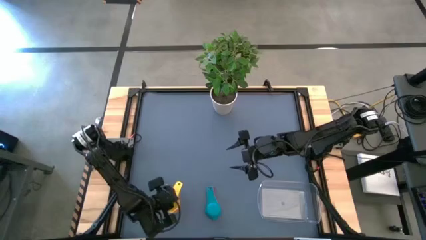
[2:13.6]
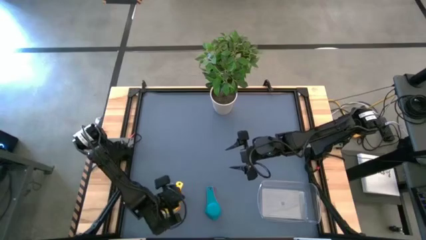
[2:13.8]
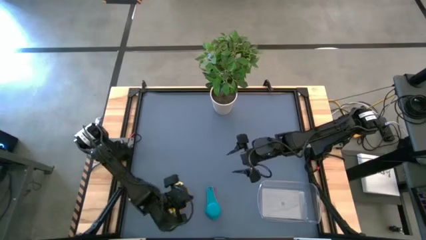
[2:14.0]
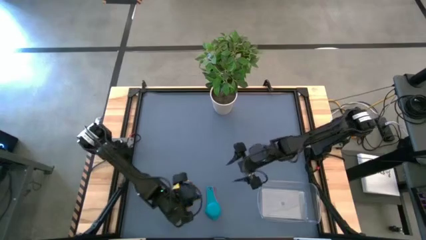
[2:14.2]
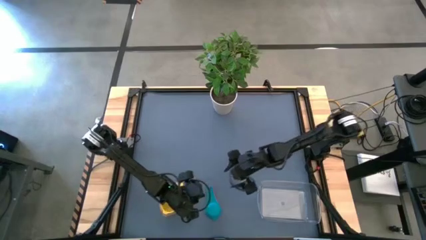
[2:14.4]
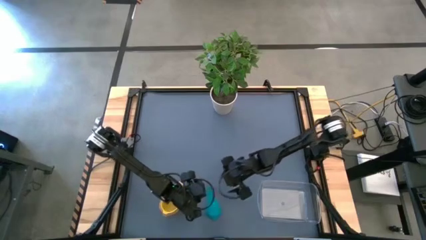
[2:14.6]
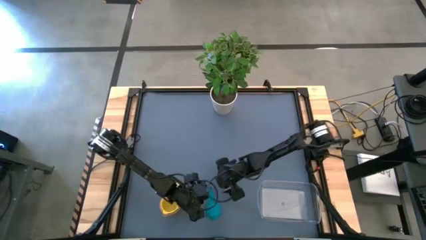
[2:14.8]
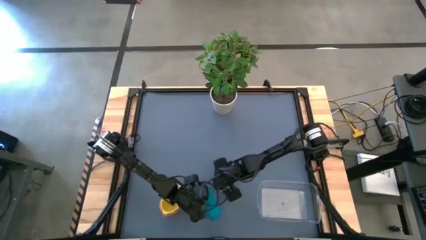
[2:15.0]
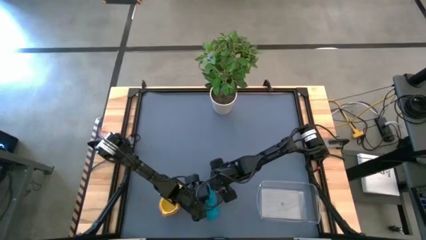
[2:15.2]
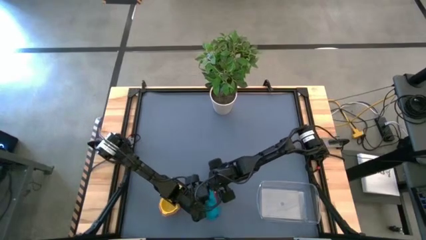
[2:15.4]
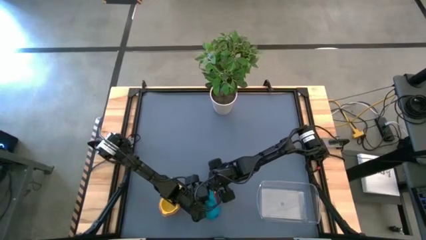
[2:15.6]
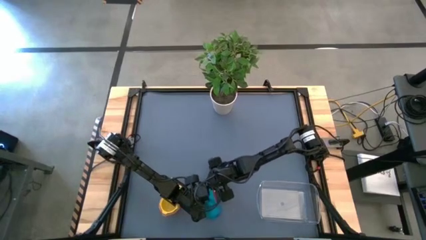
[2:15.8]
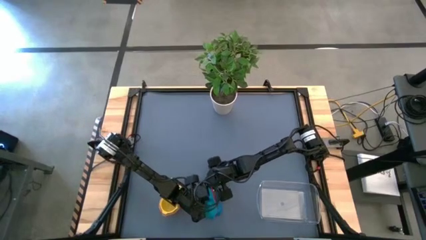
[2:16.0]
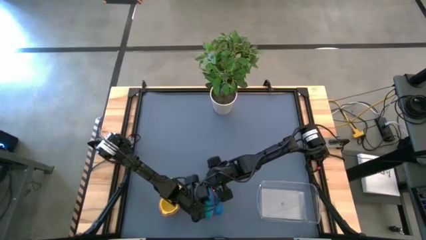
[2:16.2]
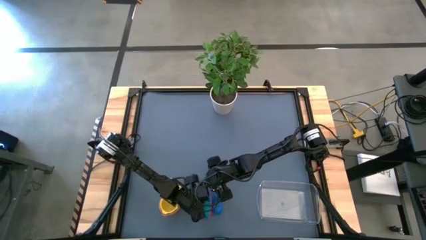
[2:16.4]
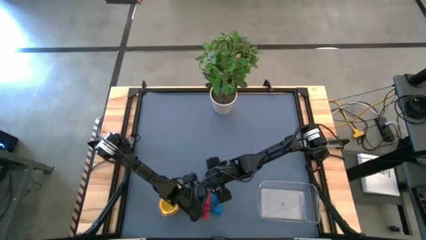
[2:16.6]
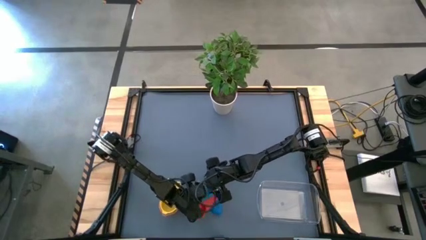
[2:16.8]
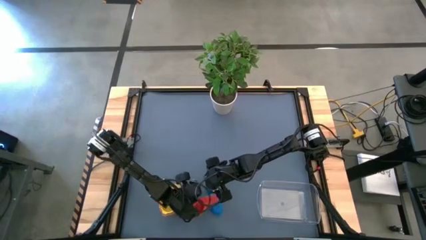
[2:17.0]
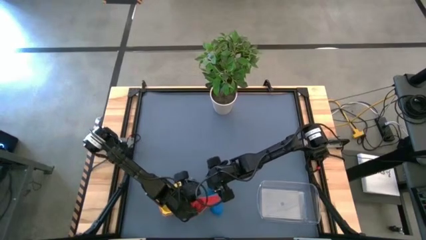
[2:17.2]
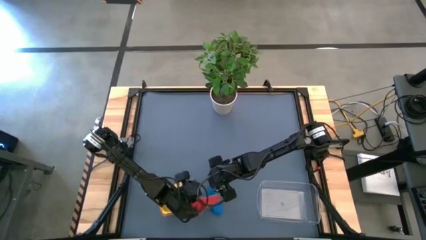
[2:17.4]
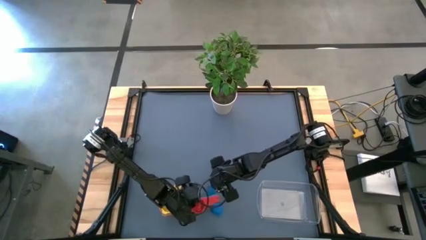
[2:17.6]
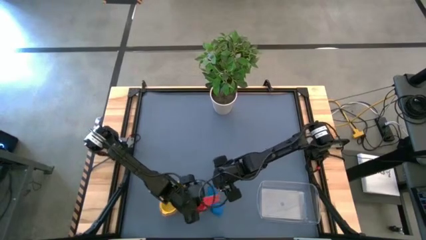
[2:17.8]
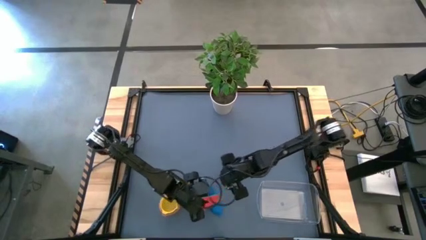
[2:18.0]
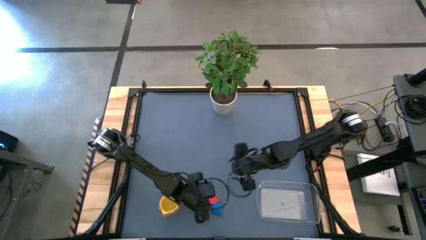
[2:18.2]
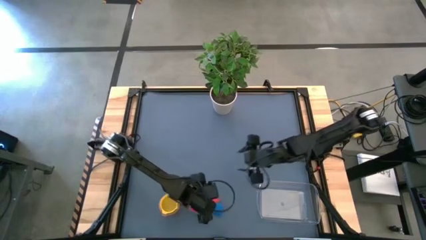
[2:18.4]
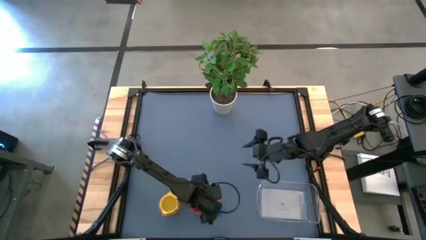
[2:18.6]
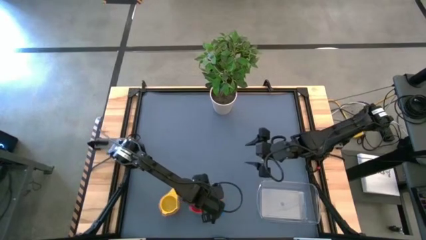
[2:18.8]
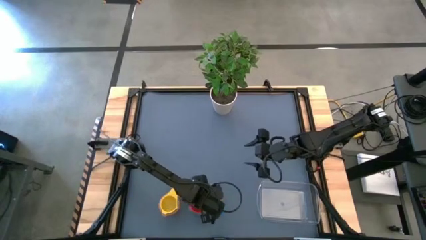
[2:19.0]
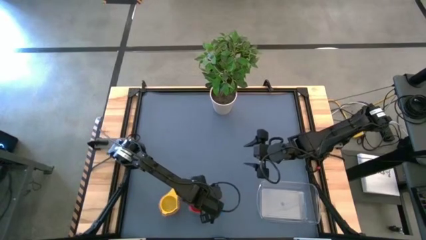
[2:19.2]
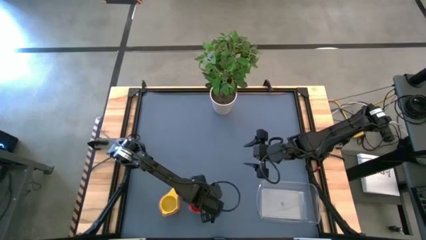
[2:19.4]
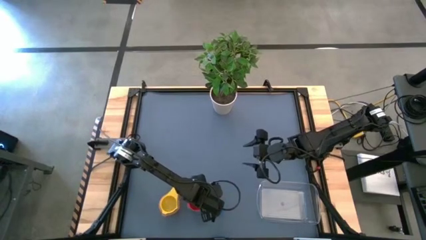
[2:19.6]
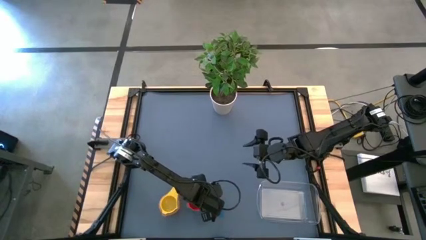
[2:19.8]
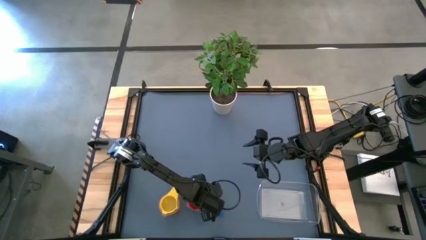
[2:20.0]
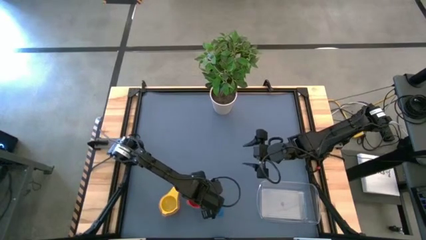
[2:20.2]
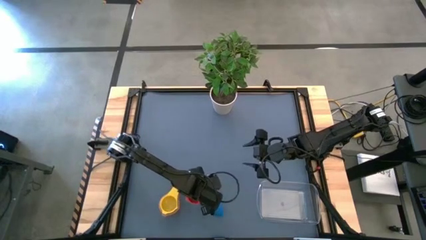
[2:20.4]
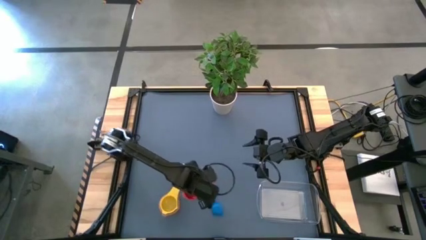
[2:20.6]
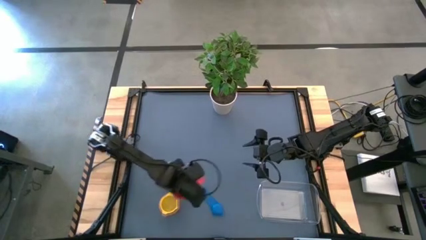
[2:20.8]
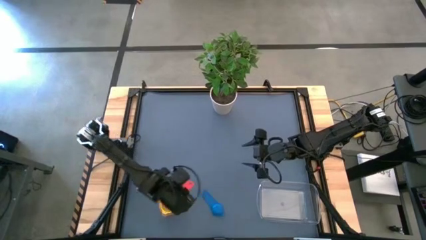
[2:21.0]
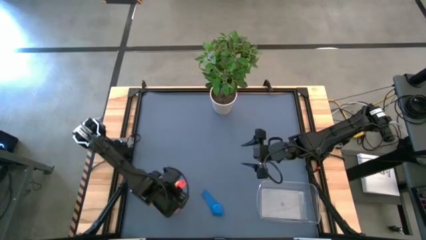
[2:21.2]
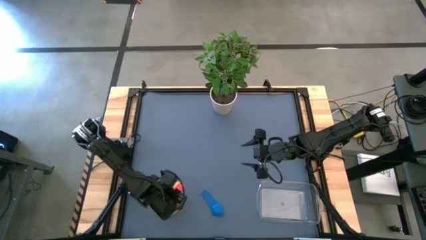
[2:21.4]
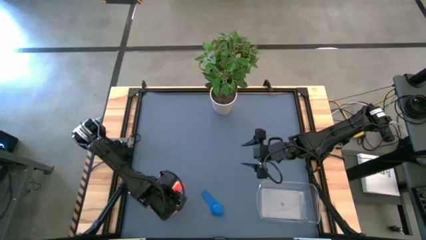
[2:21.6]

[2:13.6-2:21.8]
Task: Nest measuring cups in basket
Stack the nested measuring cups on top of the yellow measuring cup

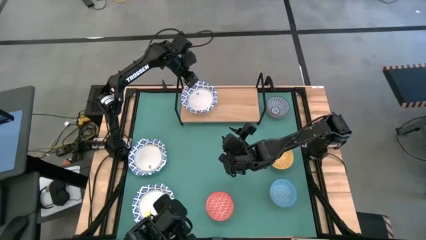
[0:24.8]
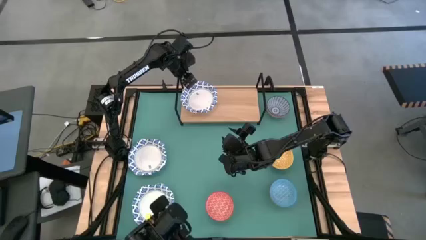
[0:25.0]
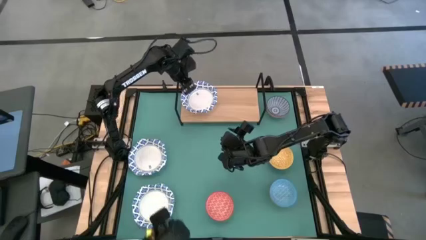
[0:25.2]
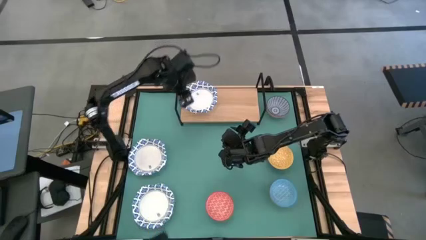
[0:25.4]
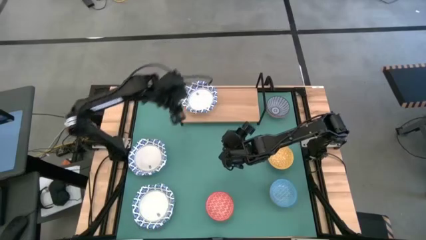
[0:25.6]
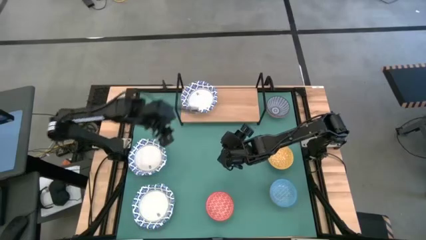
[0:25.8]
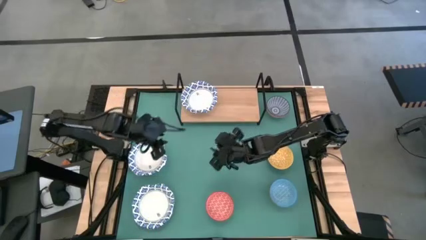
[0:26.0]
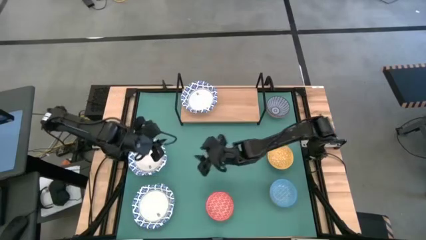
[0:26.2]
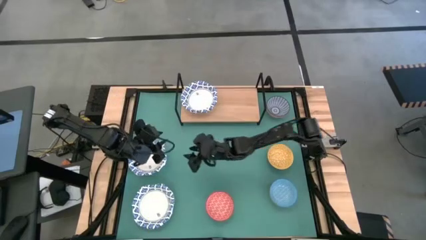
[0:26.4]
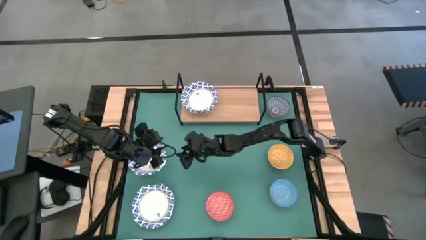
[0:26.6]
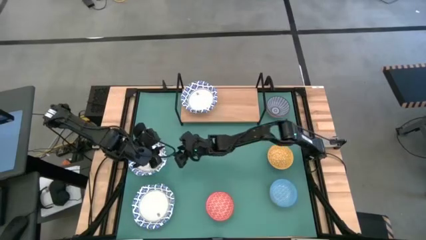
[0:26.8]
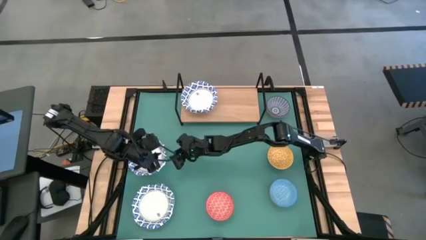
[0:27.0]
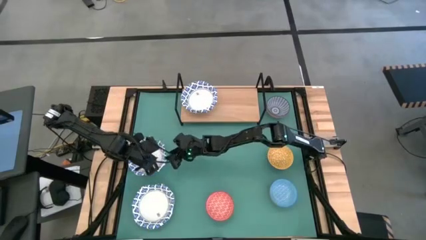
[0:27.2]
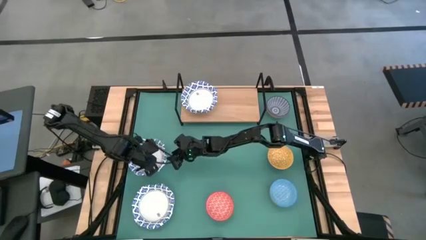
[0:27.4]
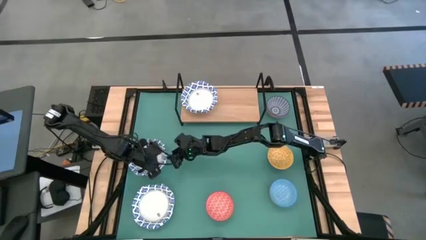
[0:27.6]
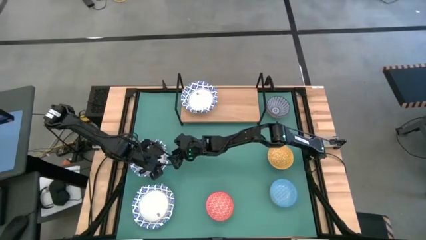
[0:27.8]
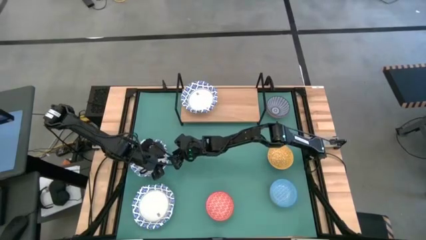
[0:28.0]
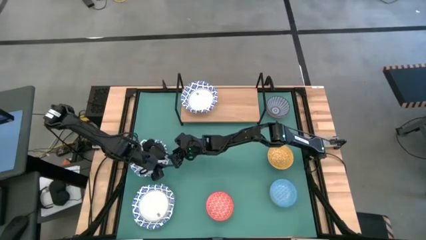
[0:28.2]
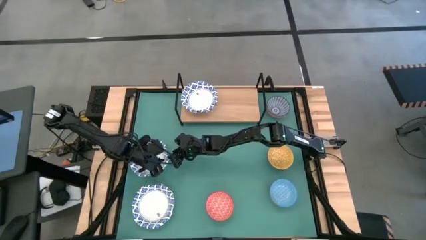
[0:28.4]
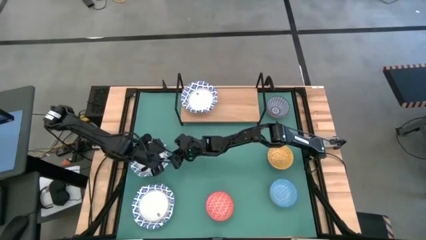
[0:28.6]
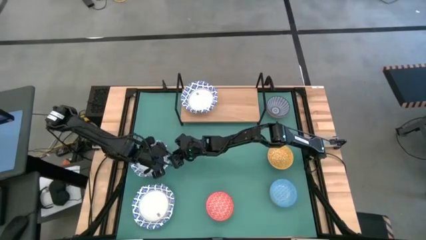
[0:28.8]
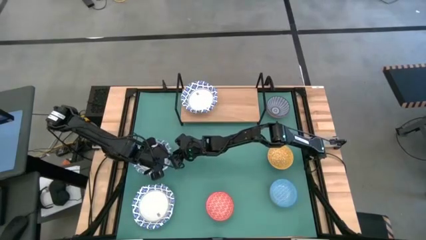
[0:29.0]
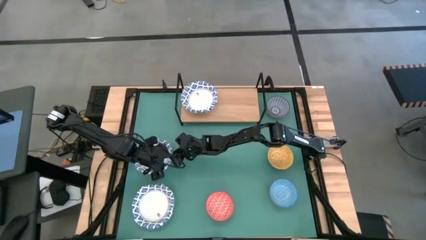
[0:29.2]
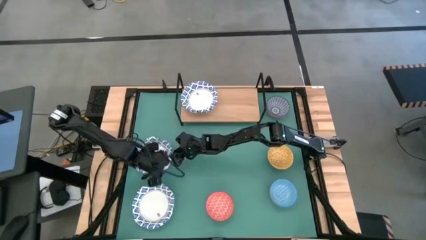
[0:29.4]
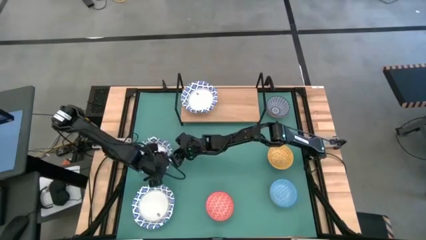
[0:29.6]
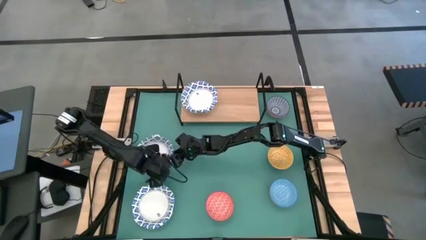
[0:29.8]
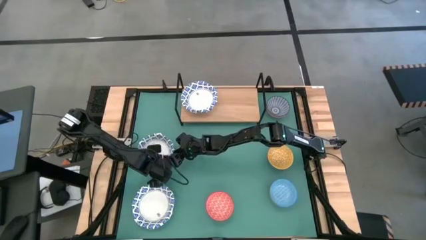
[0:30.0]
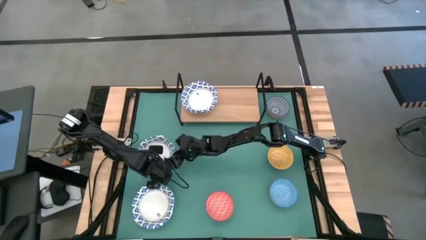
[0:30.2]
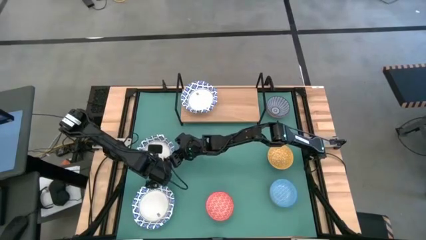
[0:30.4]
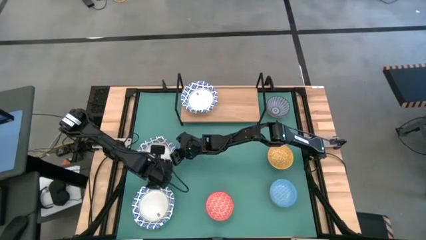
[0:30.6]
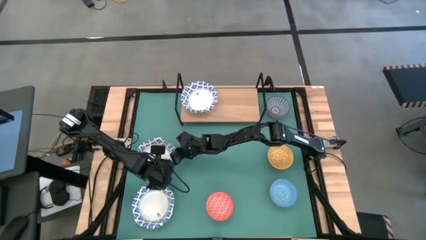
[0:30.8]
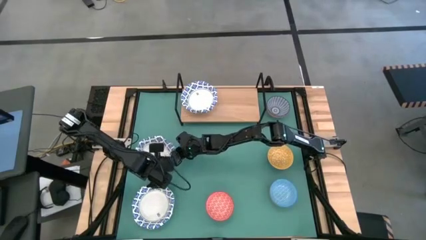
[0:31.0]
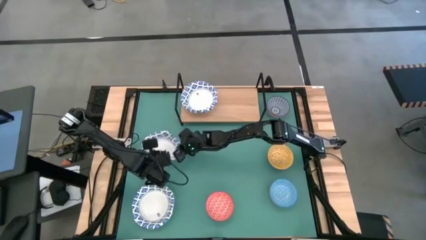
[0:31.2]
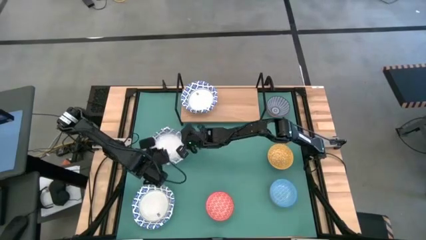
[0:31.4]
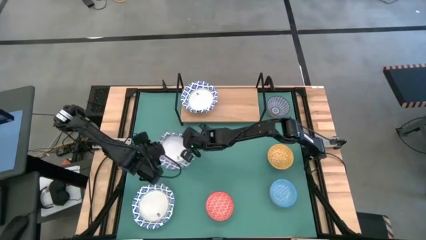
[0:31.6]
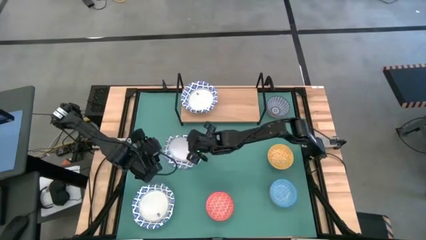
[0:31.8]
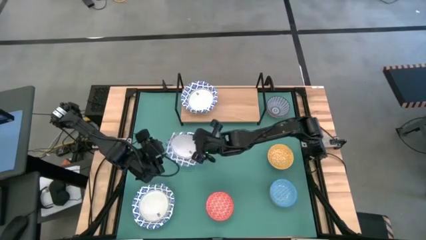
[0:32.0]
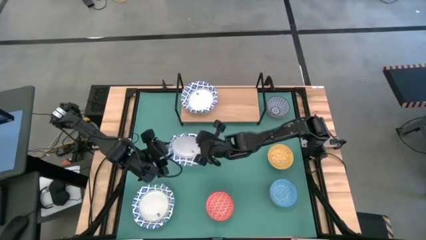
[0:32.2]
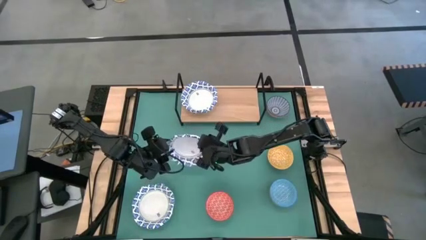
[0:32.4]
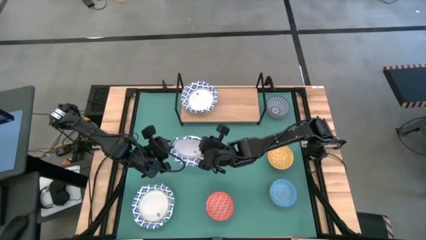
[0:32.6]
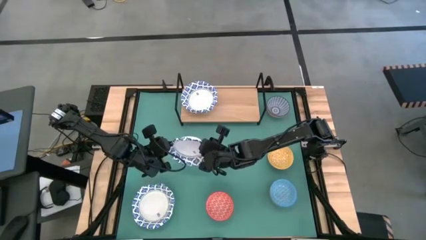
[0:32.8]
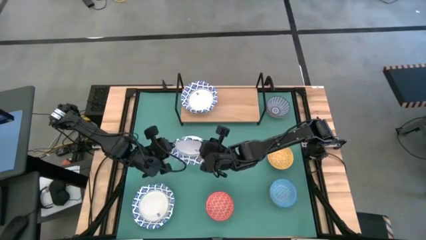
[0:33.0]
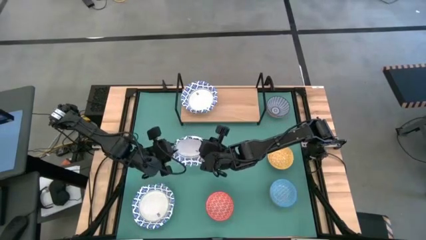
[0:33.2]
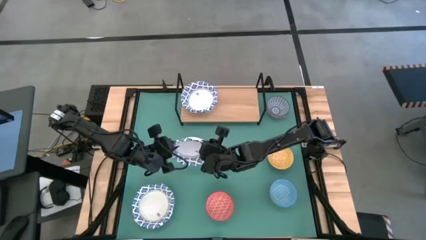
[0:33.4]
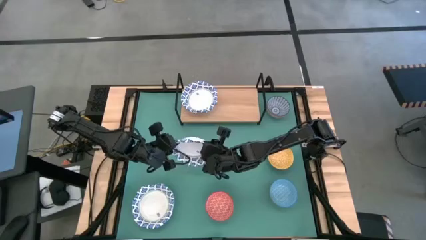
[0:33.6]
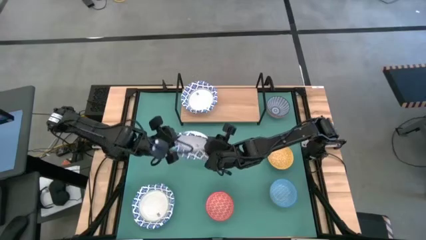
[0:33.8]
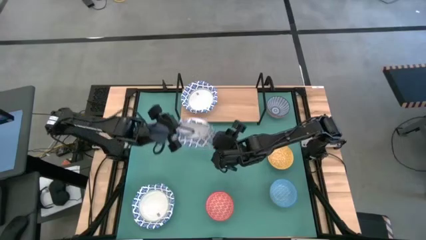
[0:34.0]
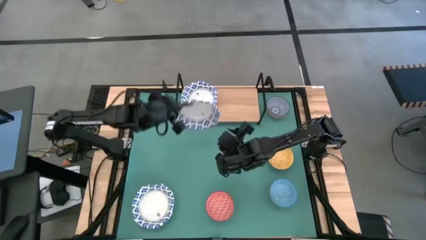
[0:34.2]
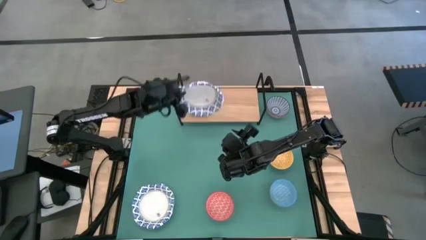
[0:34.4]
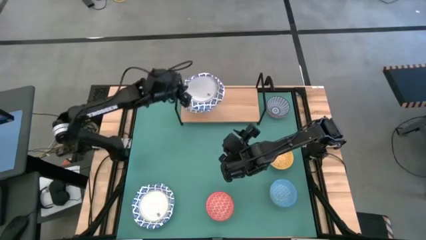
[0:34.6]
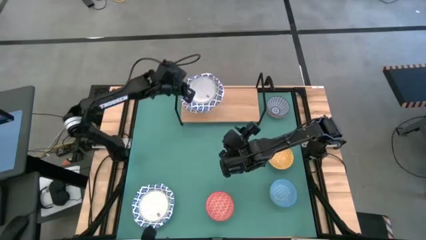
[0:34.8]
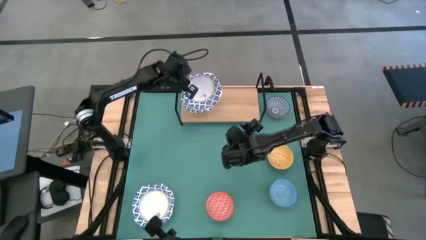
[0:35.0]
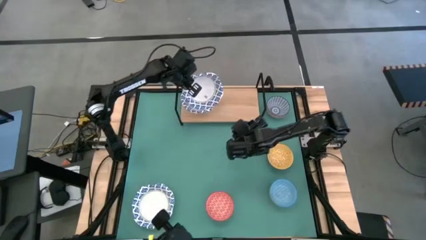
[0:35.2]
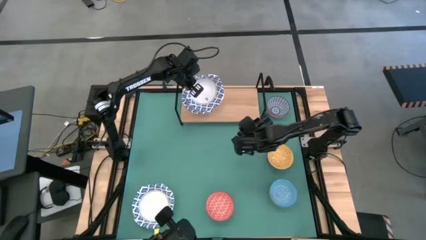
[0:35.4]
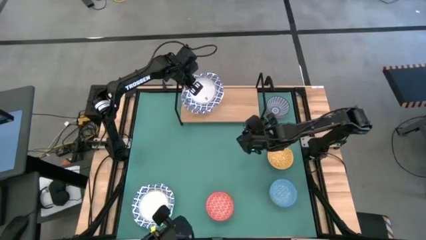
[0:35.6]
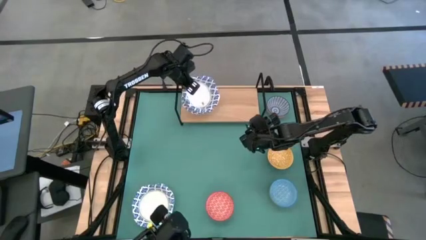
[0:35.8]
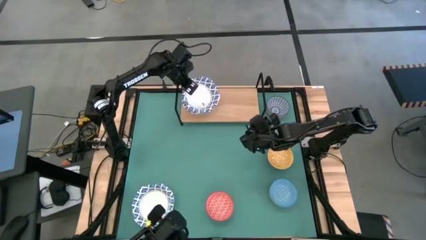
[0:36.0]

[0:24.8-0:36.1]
Task: Place and stack bowls onto a shelf
Stack the white patterned bowl on top of the white patterned bowl on the shelf
